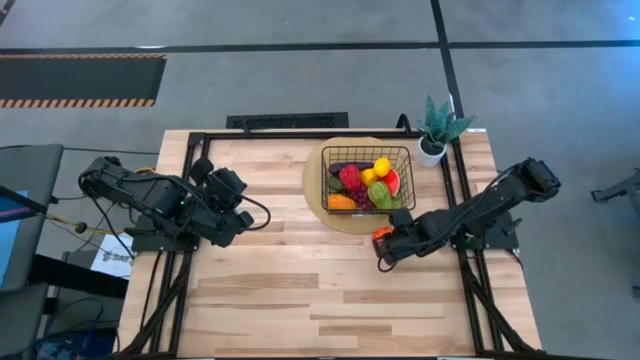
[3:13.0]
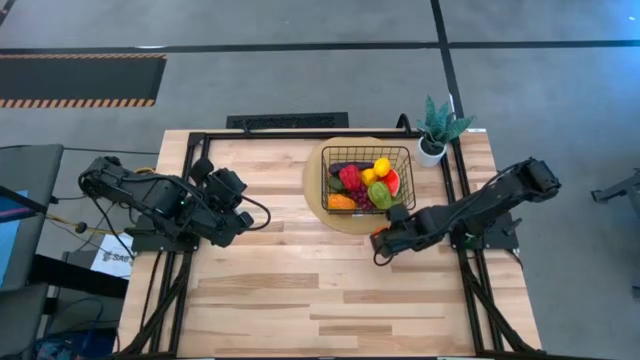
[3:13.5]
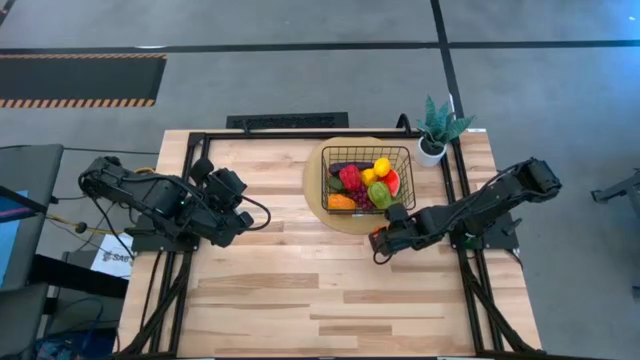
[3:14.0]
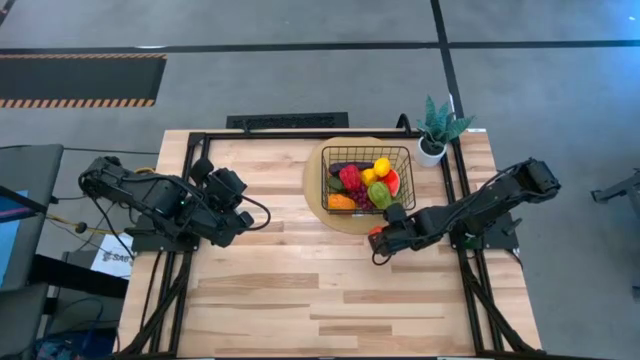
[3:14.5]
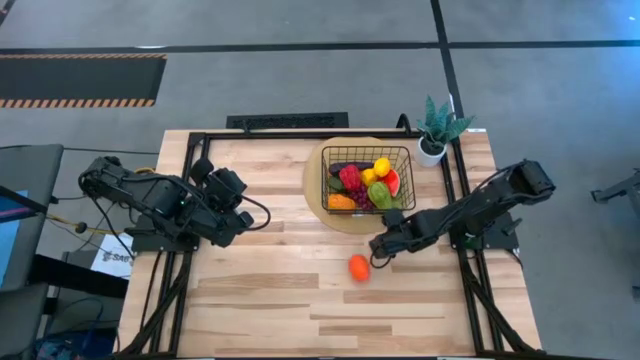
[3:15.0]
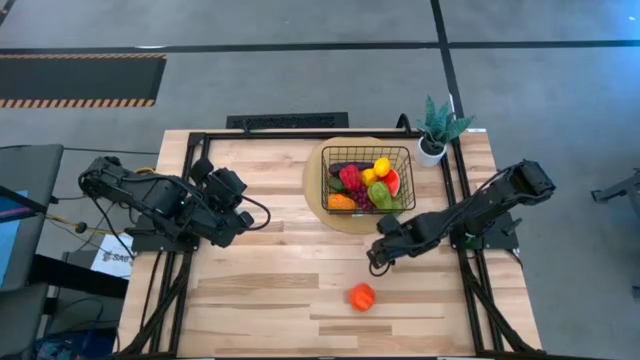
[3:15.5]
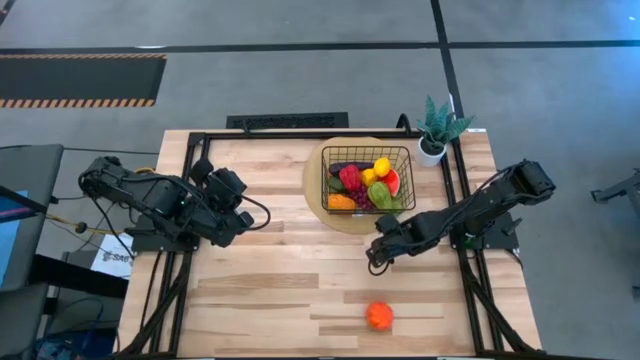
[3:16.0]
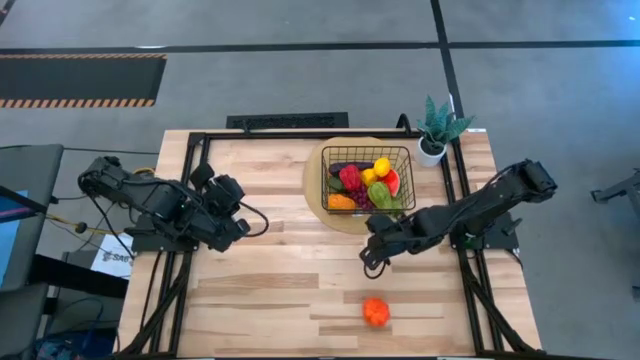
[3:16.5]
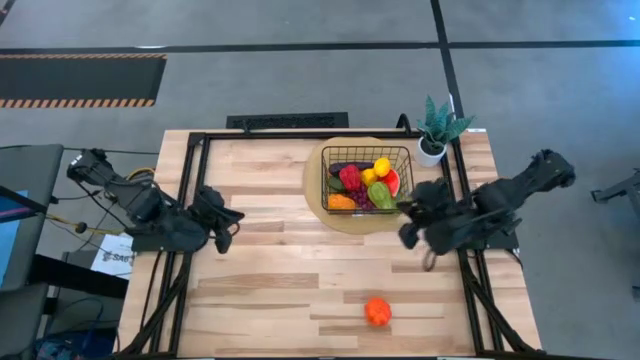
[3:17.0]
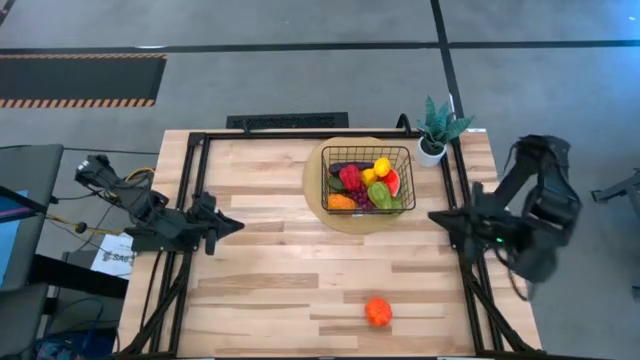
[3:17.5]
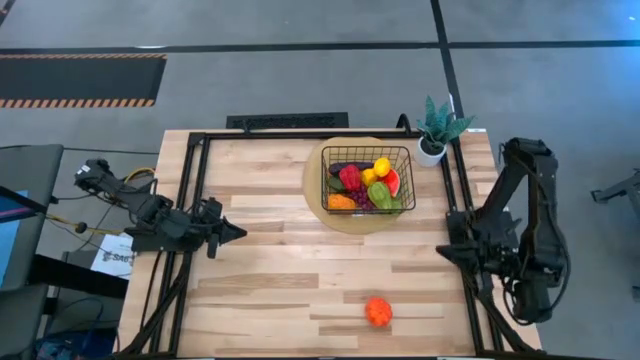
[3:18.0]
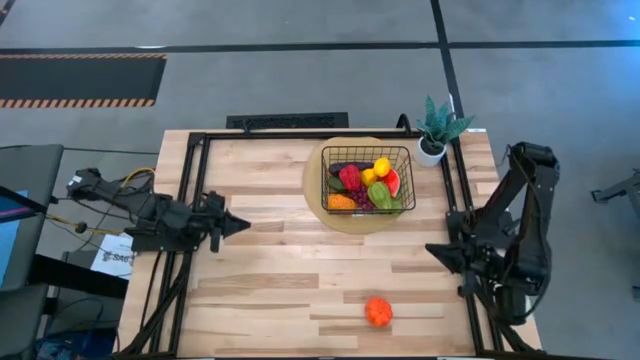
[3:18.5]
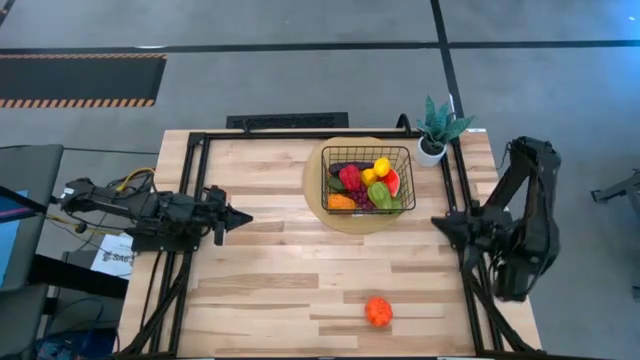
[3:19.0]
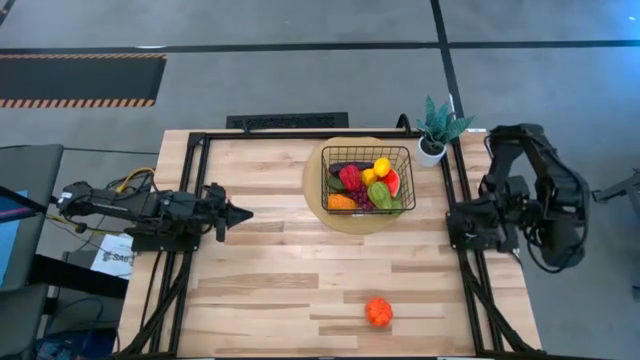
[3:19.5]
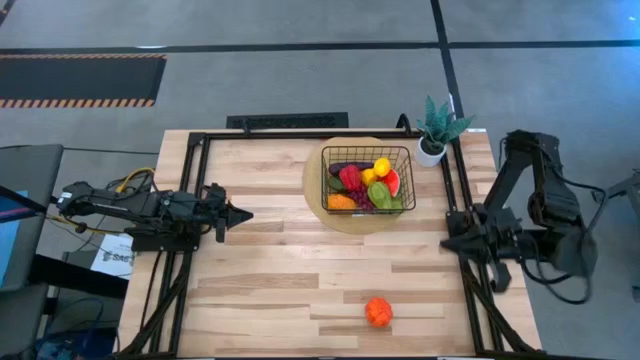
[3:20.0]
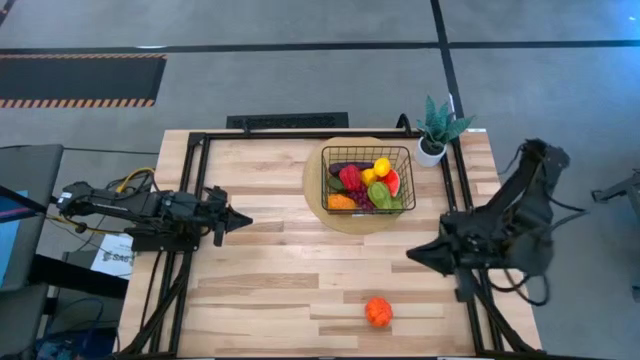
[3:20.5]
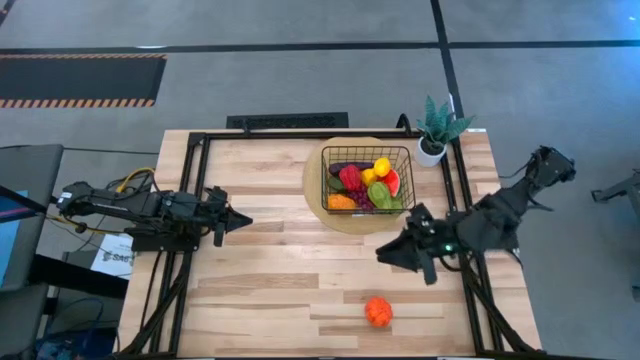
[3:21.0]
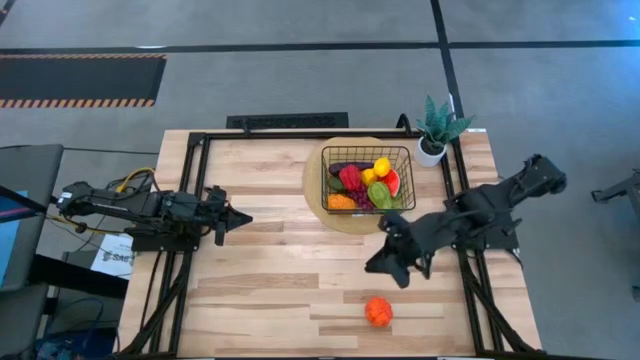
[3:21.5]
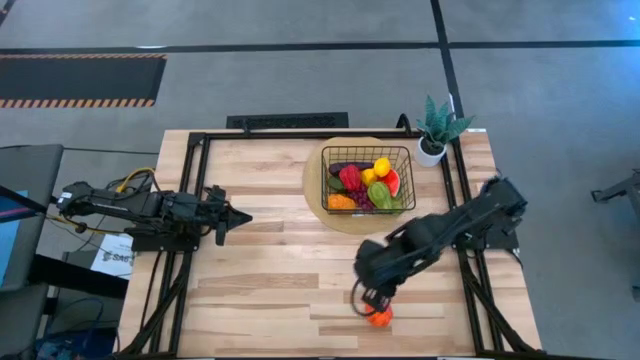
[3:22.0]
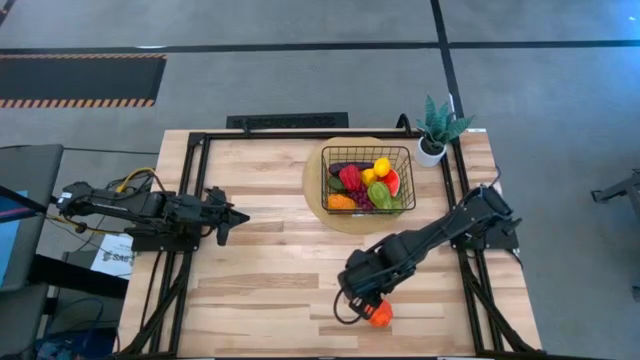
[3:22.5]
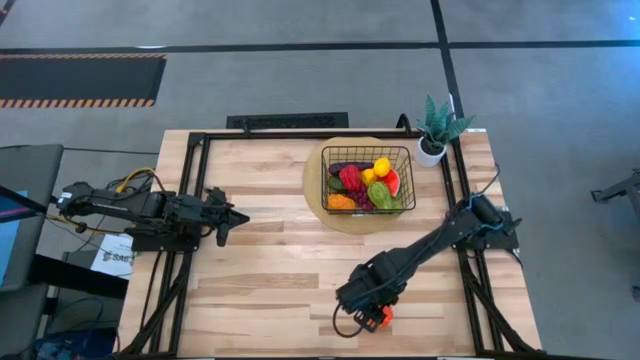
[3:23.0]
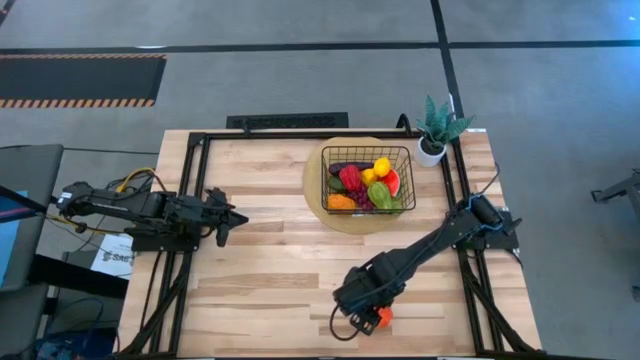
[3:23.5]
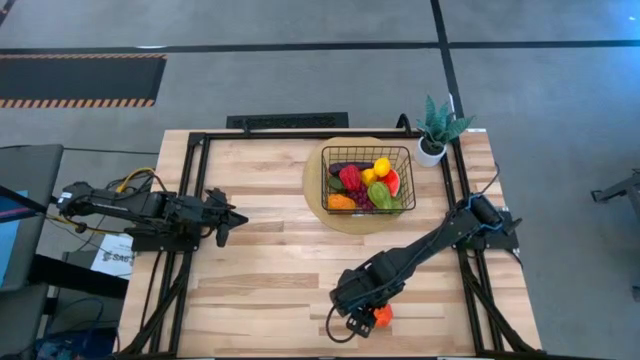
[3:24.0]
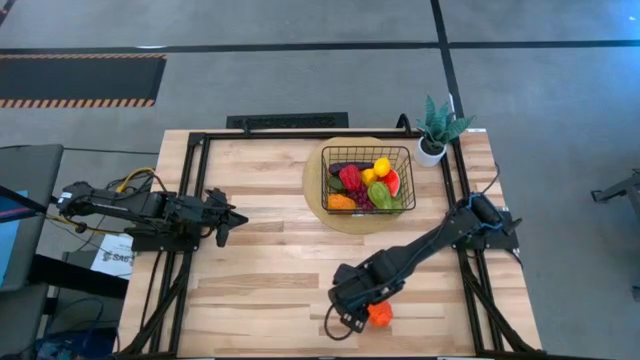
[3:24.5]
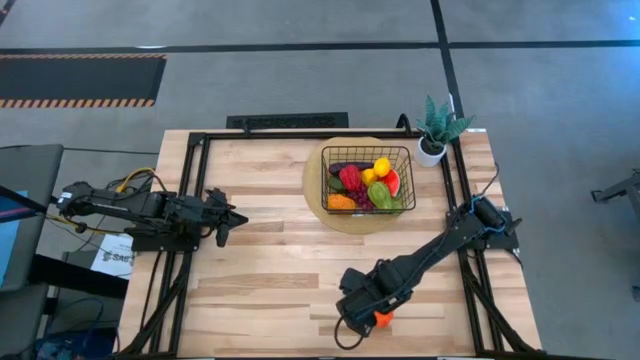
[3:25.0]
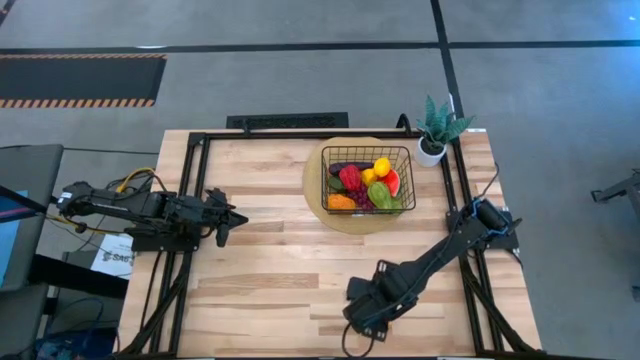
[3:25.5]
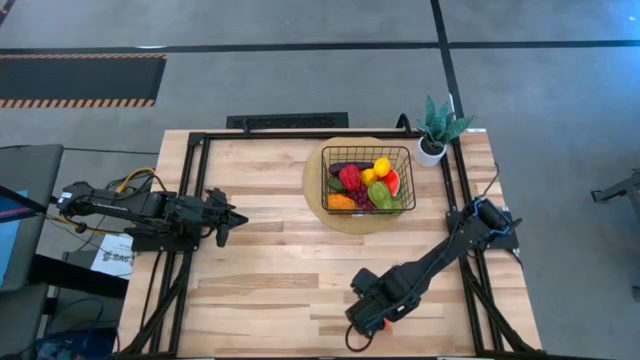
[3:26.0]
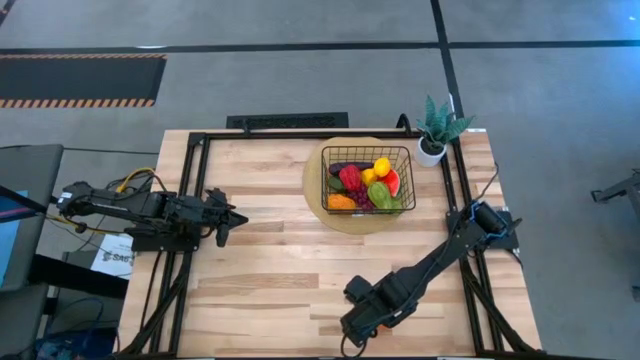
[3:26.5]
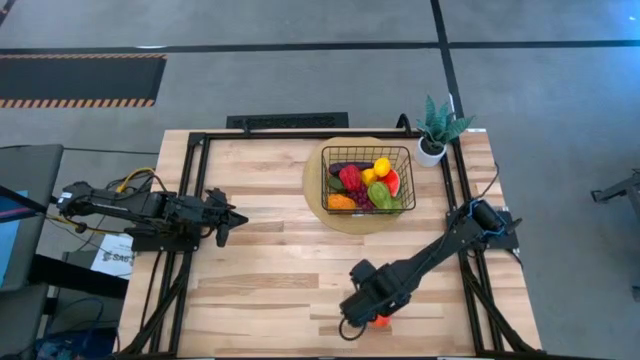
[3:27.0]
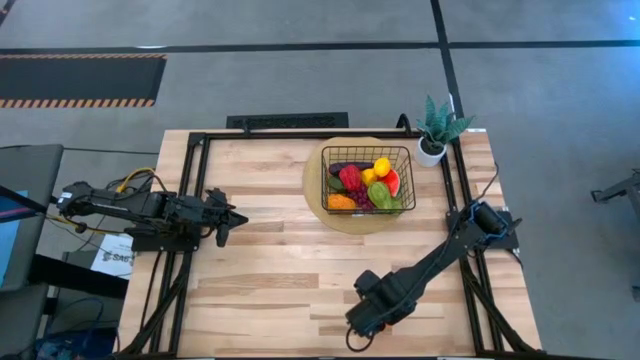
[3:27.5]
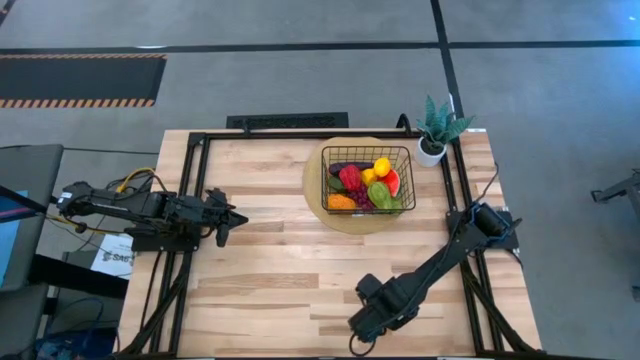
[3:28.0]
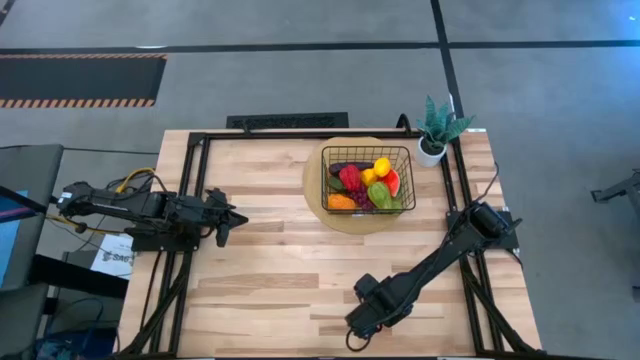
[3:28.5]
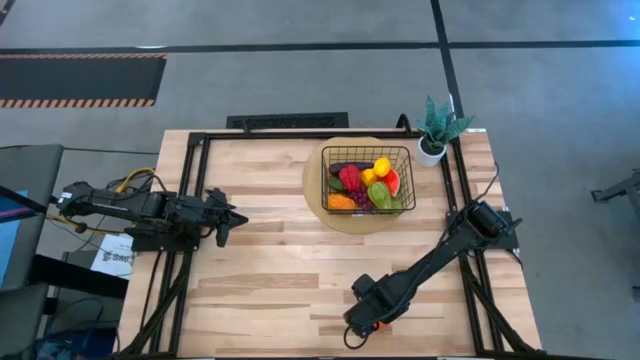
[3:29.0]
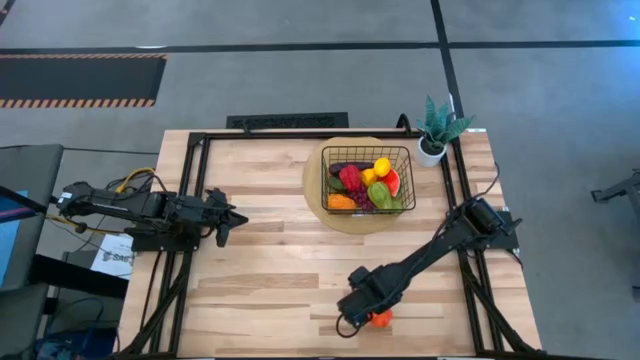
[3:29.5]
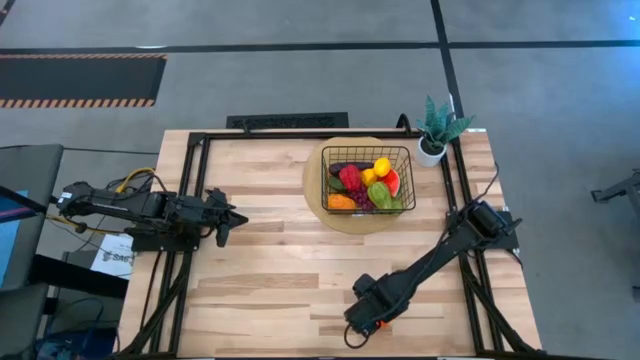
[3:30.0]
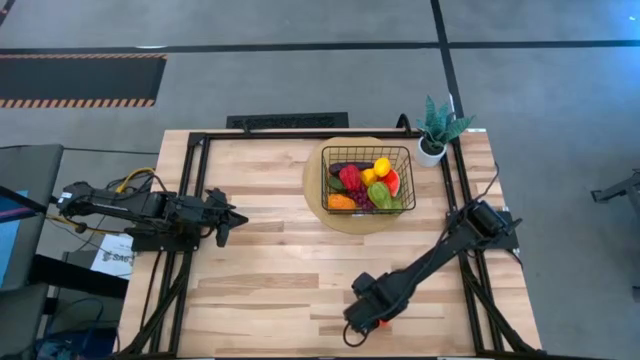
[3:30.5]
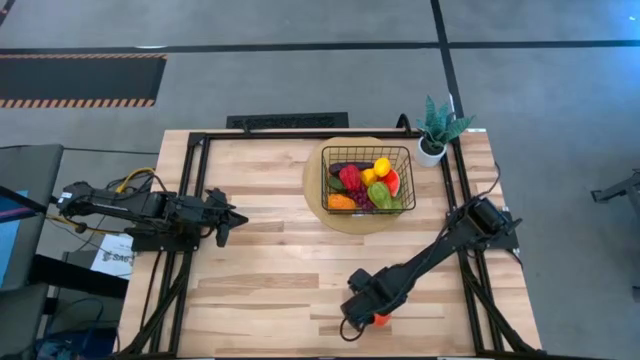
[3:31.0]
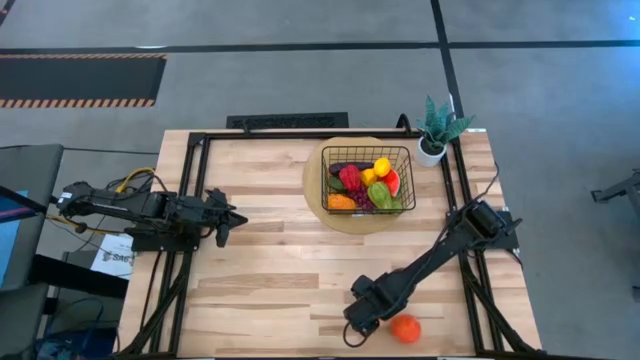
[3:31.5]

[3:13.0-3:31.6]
Task: Build produce basket
Put the orange pumpkin into the wire basket

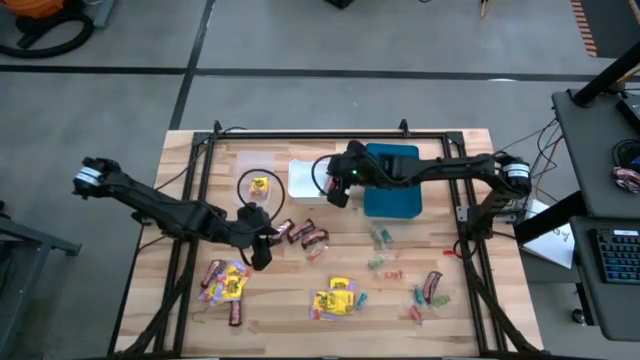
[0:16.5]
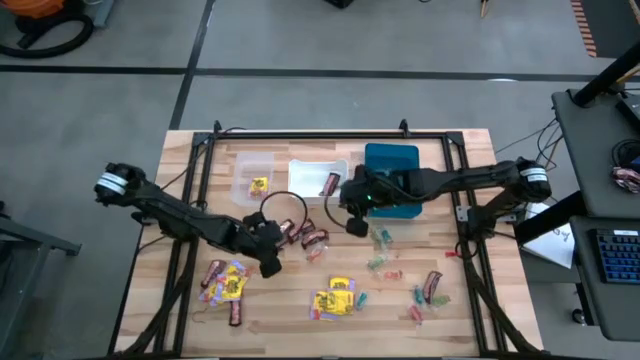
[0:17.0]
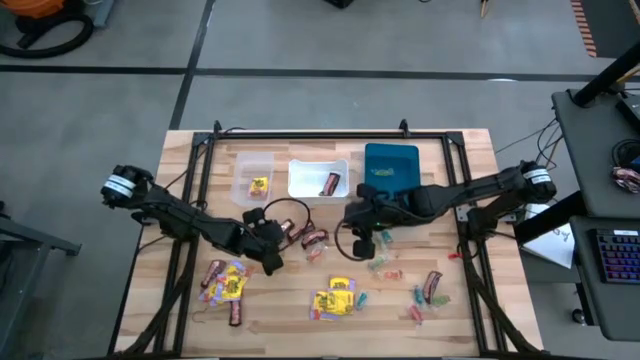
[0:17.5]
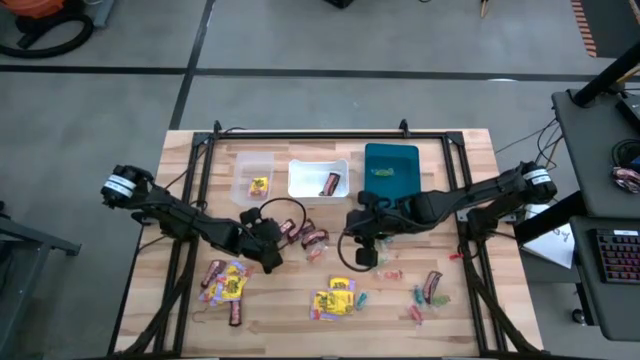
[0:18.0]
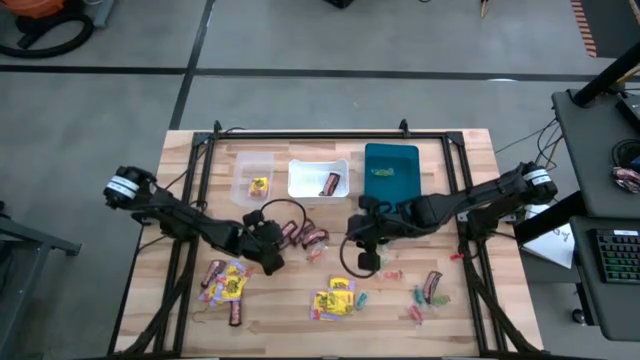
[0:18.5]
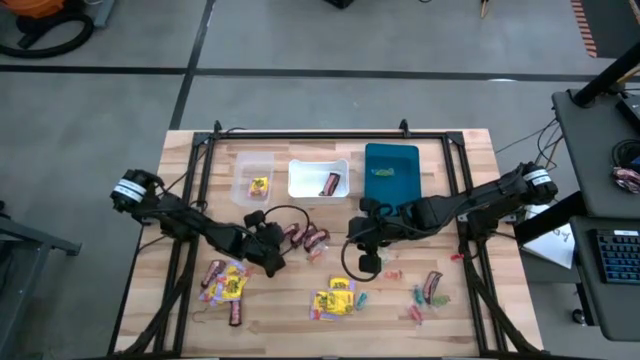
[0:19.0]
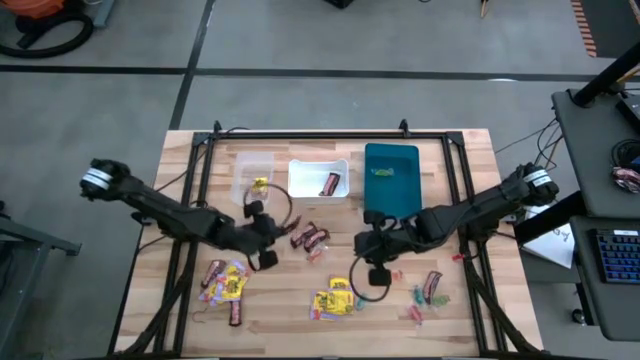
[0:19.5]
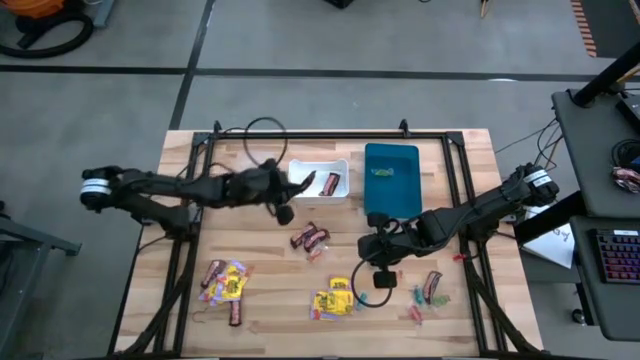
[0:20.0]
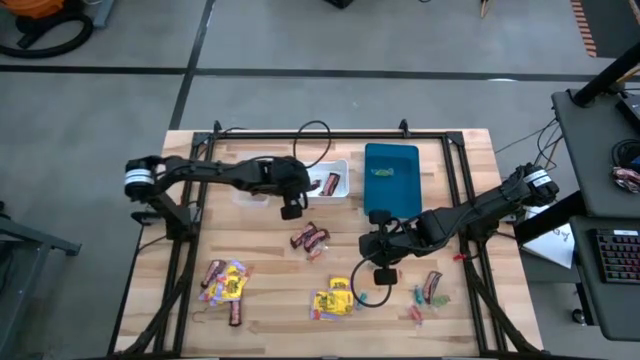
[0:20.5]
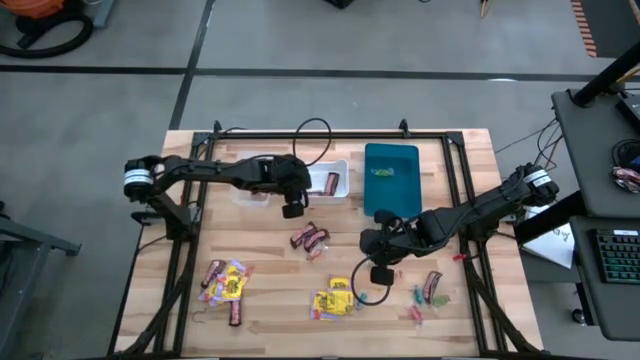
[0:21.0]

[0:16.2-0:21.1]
Task: Sort candy
Put the brown chocolate into the white bin
